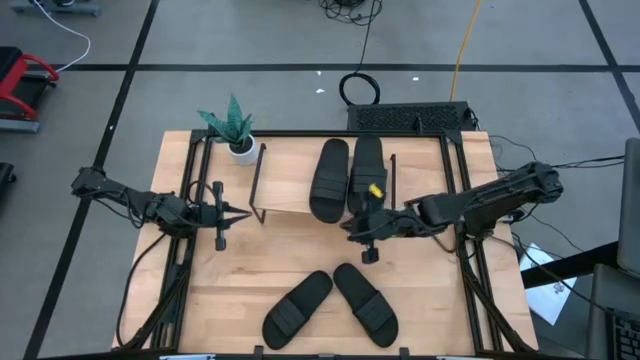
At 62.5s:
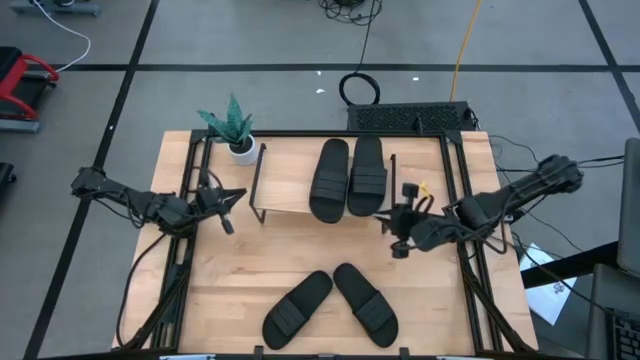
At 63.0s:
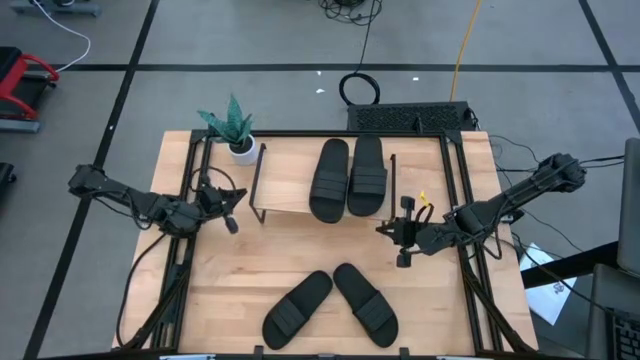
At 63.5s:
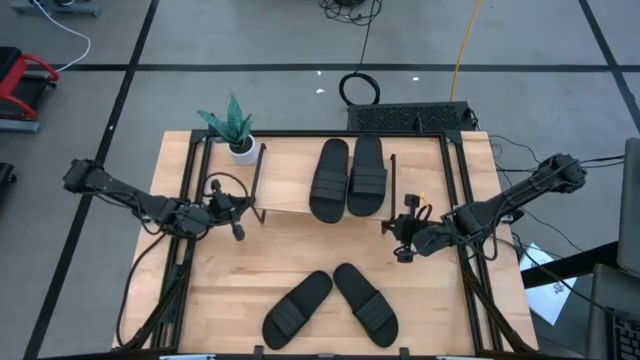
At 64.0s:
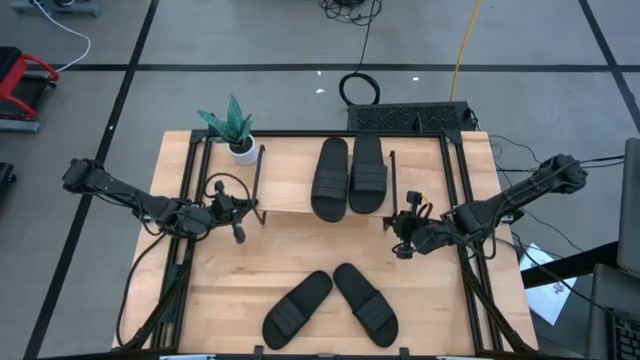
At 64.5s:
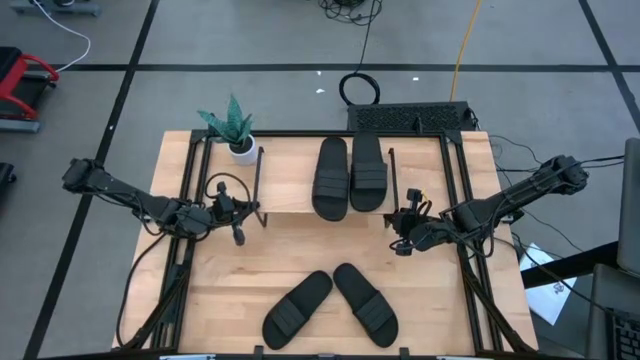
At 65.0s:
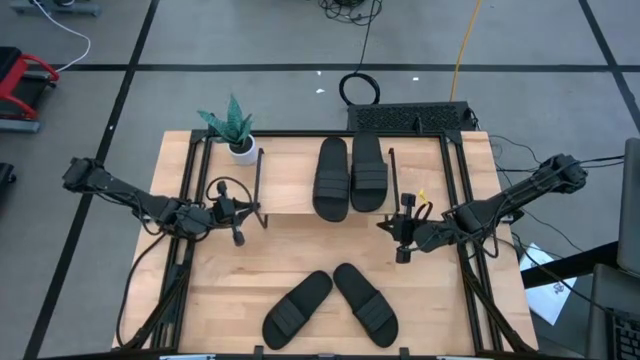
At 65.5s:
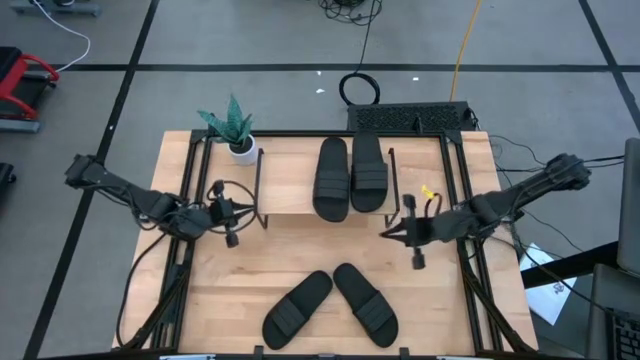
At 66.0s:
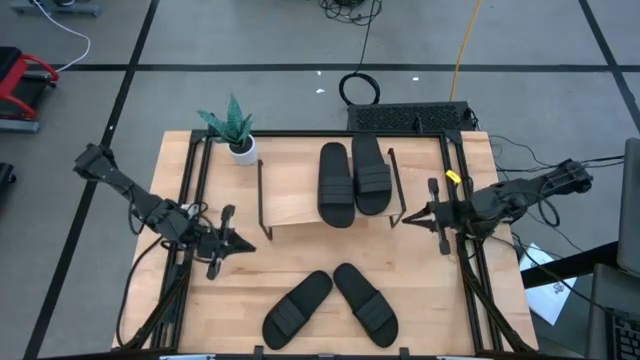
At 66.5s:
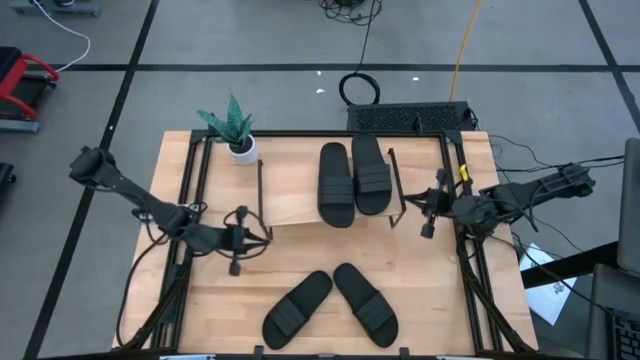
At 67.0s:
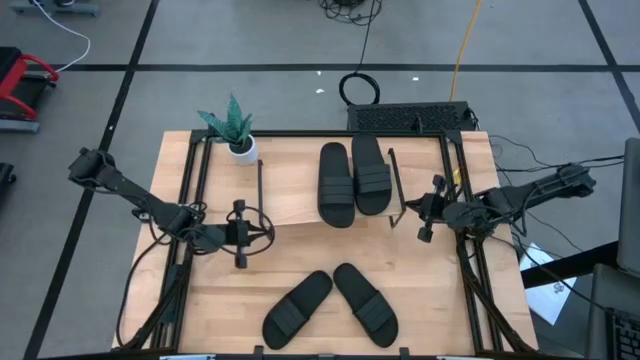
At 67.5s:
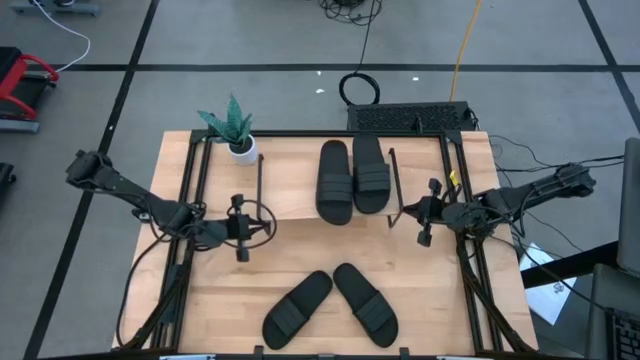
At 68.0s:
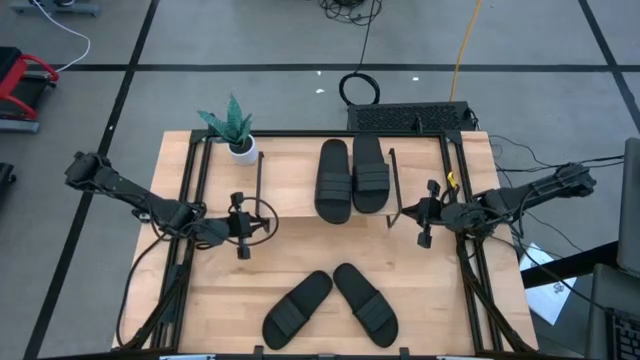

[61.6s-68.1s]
Task: Pick and place slides into the shelf
Adjust the shelf

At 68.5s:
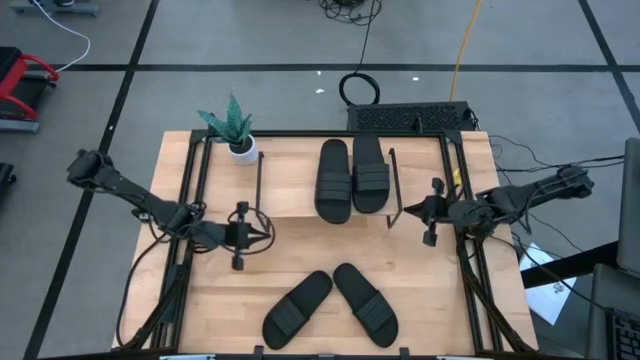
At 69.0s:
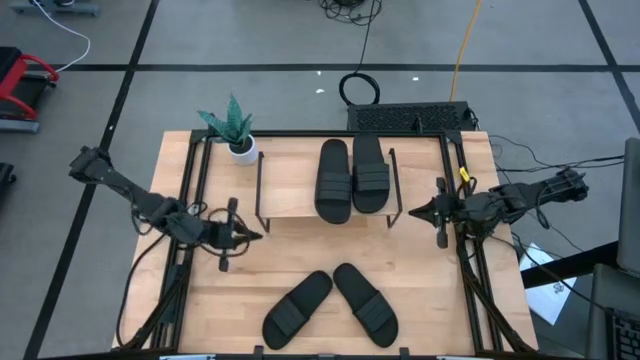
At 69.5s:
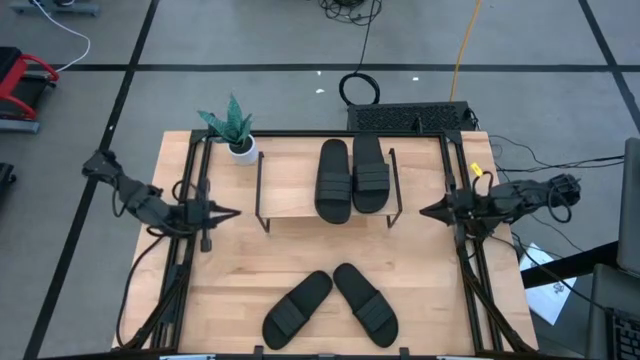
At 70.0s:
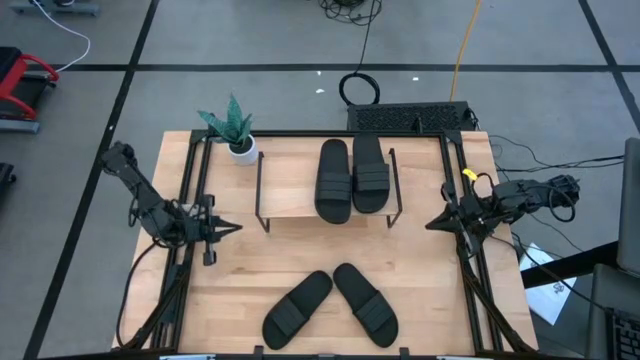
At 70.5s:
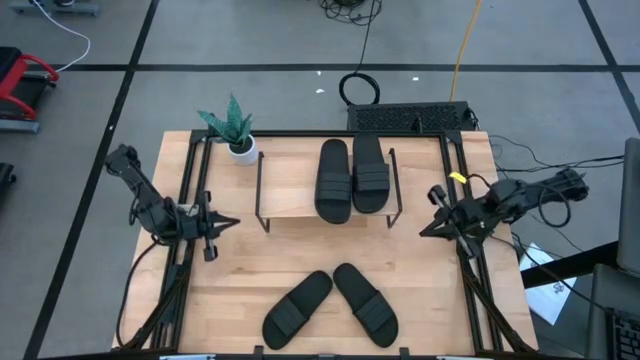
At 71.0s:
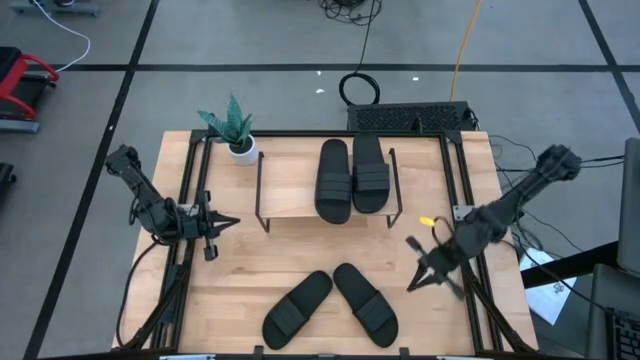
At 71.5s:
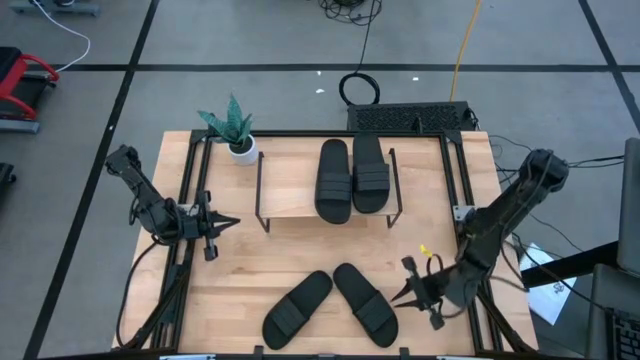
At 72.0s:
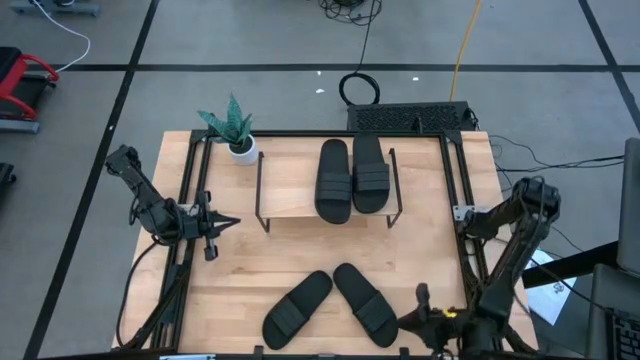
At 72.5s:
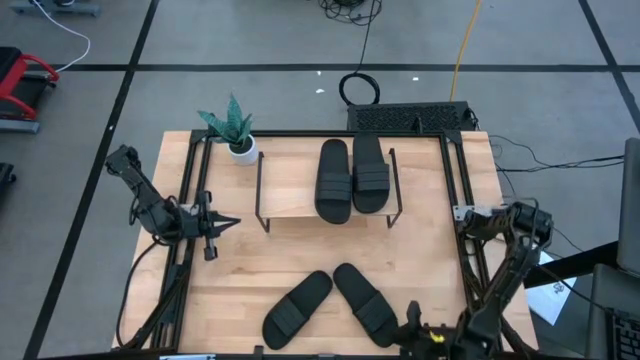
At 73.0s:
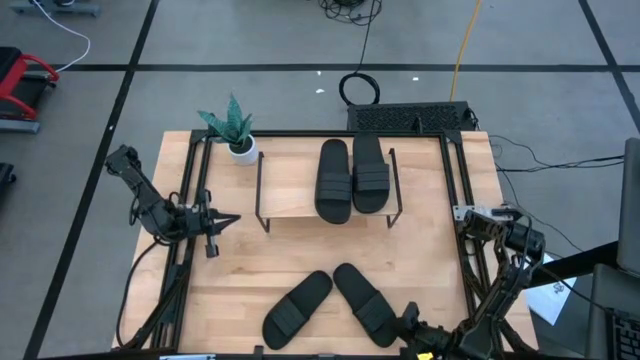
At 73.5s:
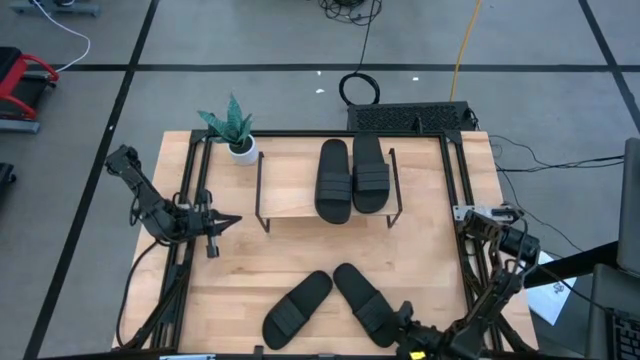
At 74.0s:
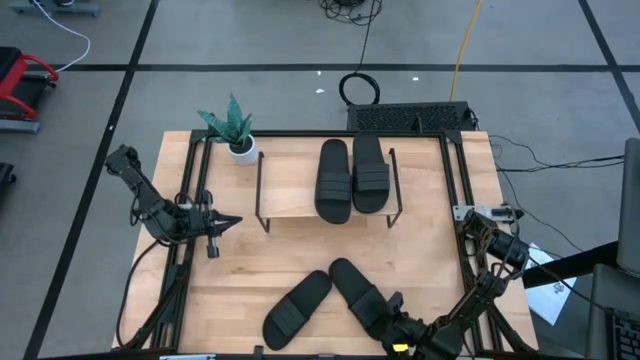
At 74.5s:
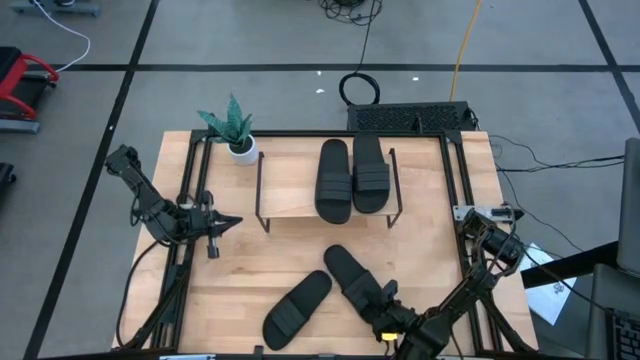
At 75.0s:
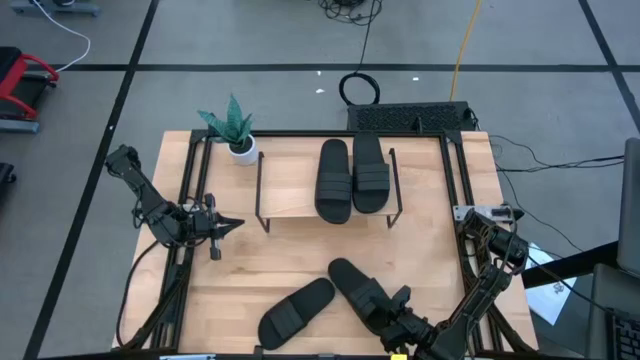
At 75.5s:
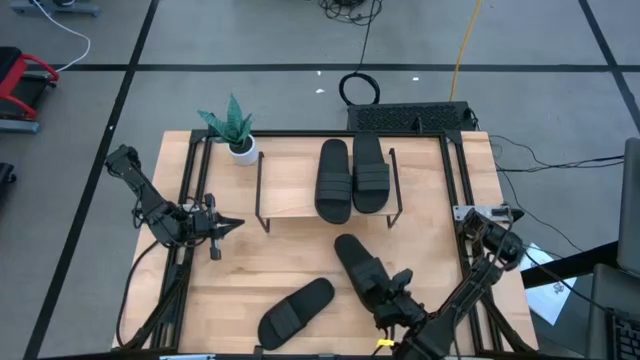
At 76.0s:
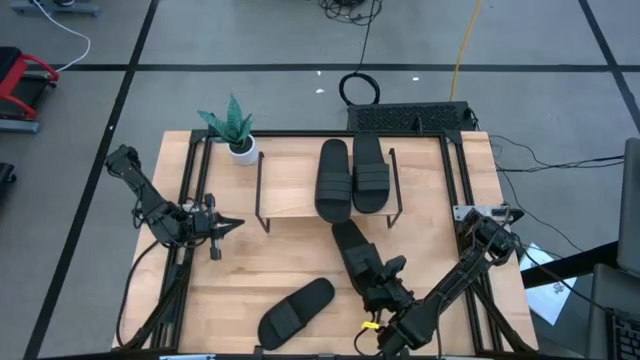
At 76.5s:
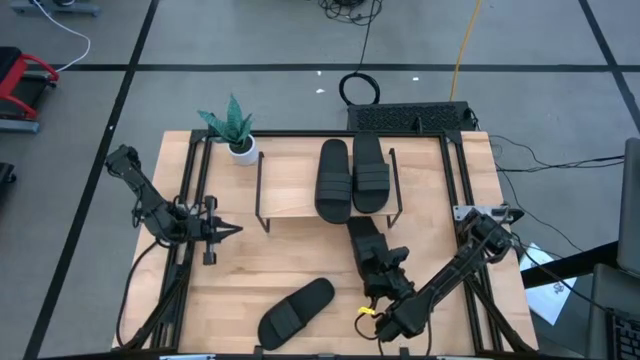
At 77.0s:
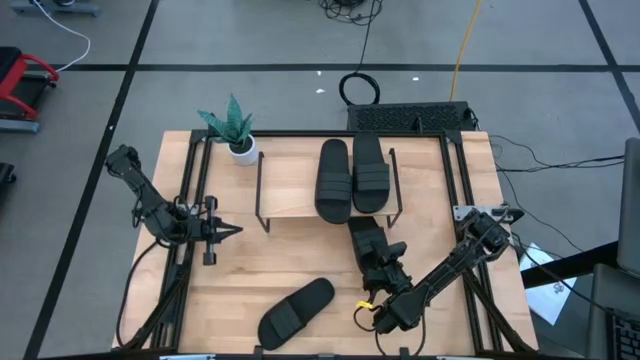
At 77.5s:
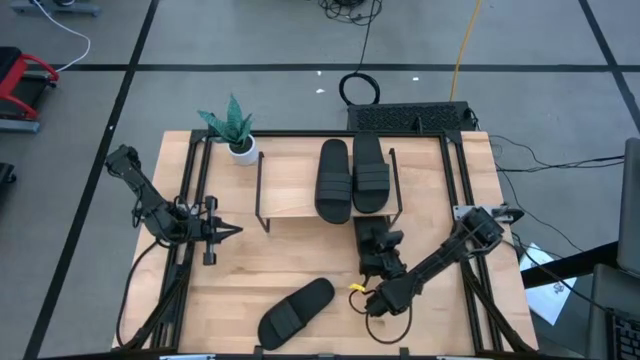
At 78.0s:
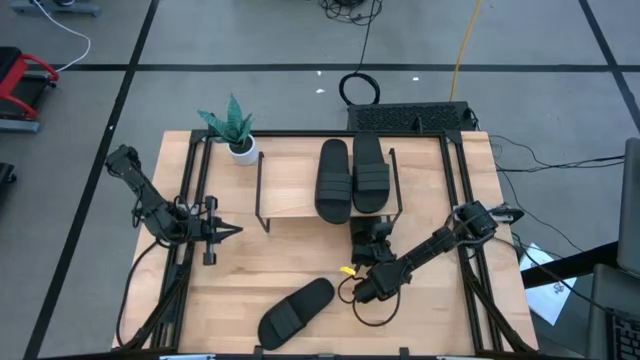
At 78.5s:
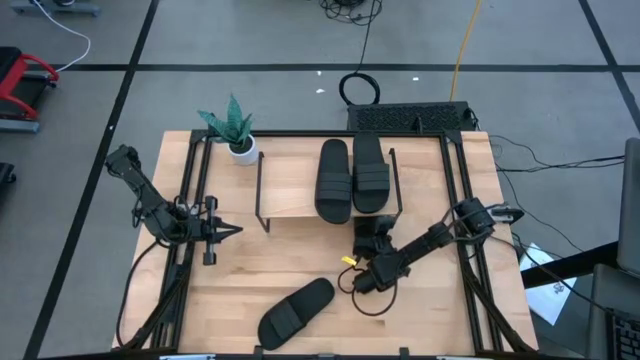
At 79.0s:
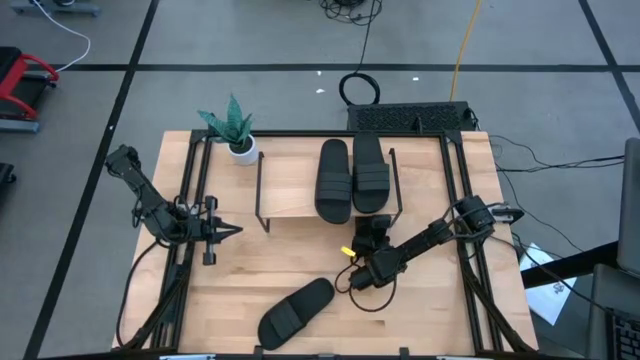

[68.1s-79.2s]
Put the right black slide under the shelf

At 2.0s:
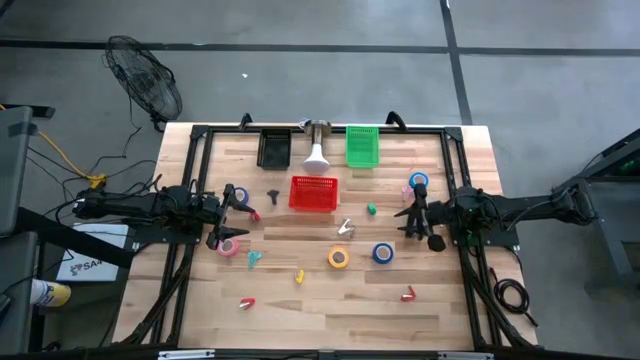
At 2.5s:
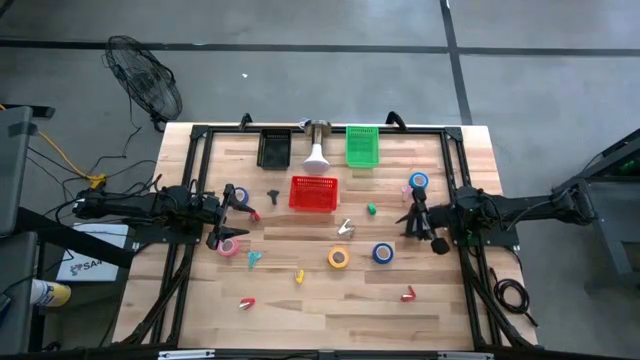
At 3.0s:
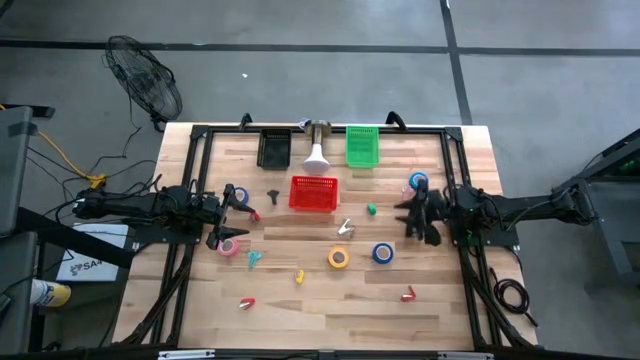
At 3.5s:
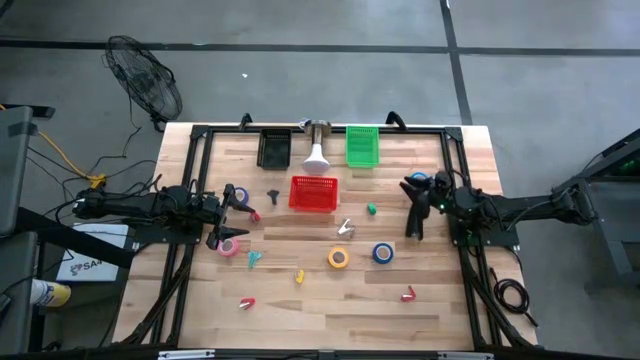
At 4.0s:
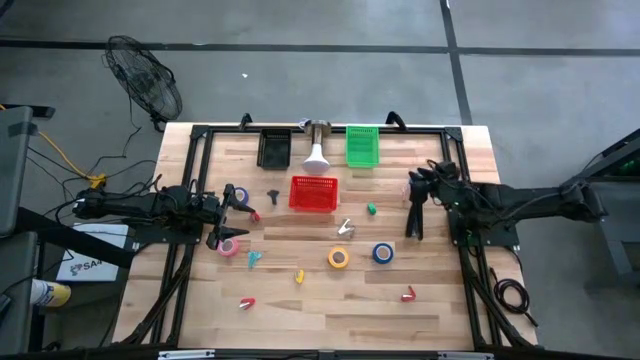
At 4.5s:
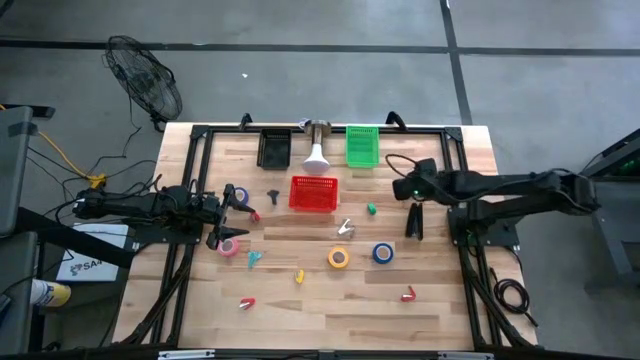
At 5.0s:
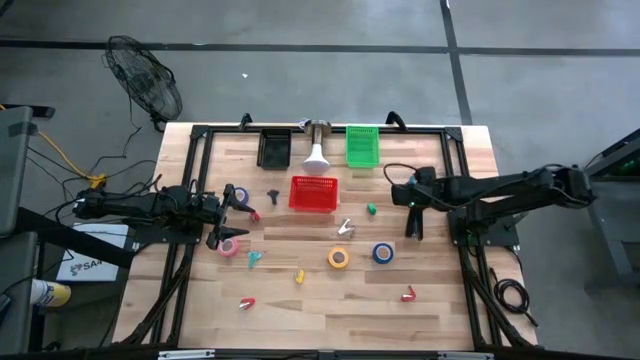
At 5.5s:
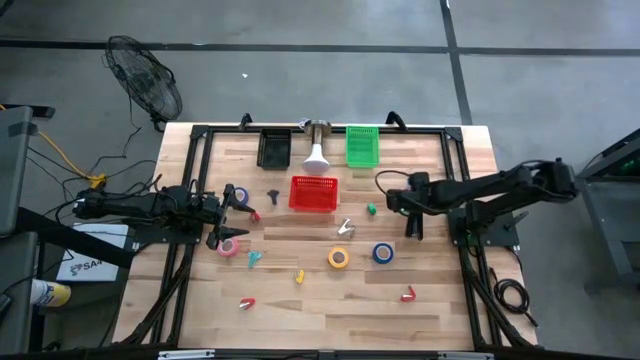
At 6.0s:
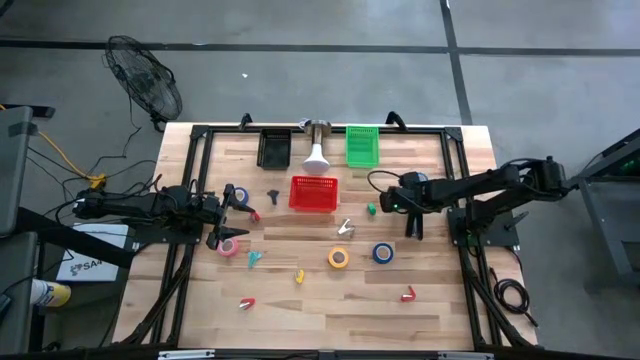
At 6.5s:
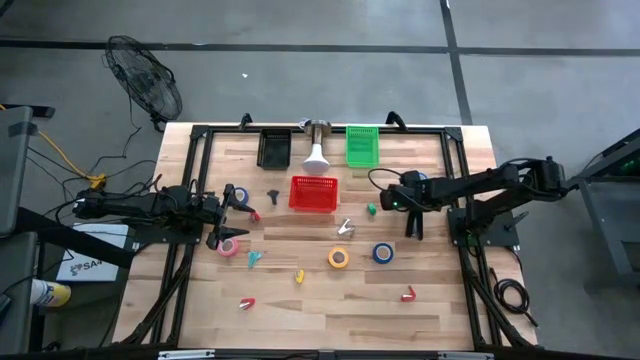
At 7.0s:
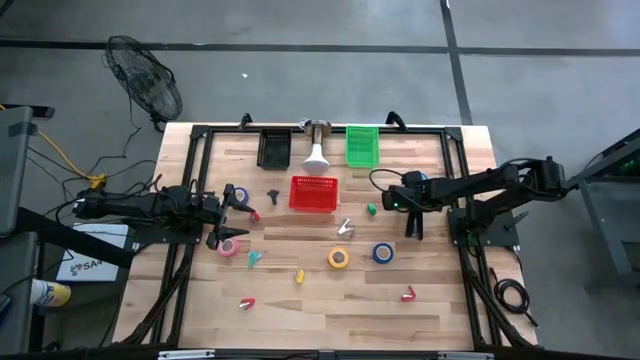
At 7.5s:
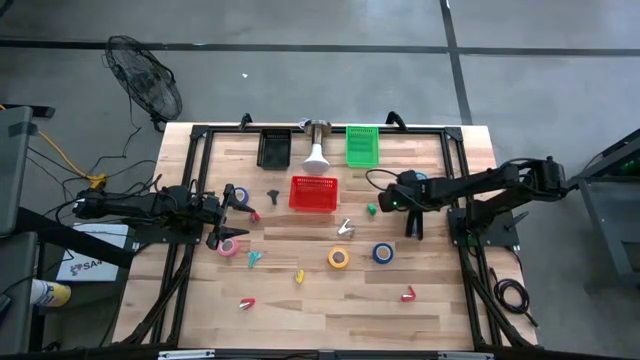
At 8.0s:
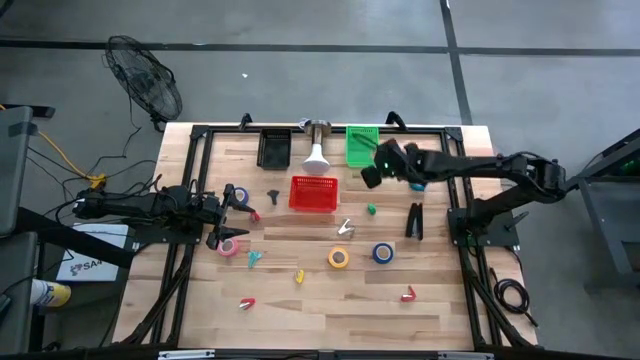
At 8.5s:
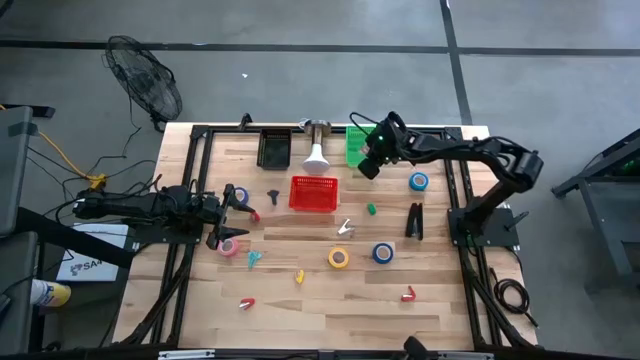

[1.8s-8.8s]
Task: Pick and place Stapler, Stapler remover, tape
Put the pink staple remover into the green basket
